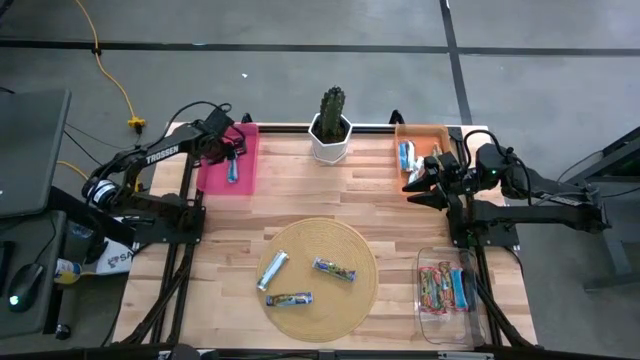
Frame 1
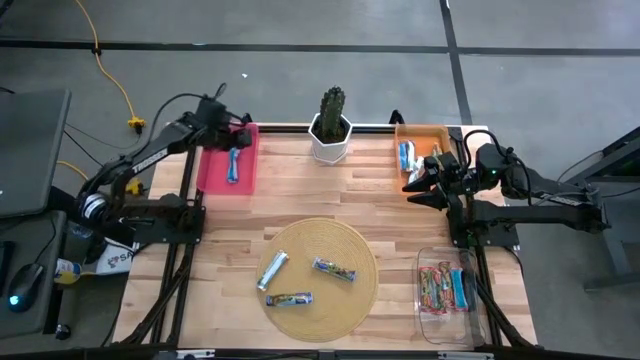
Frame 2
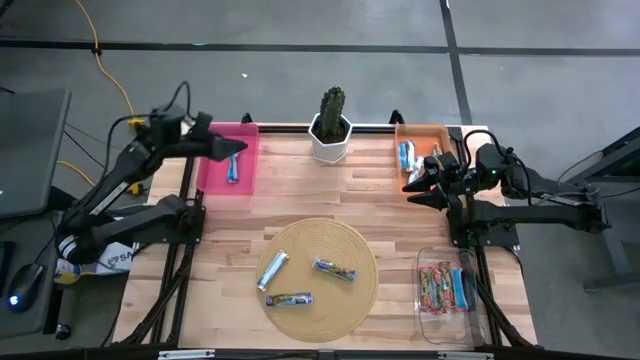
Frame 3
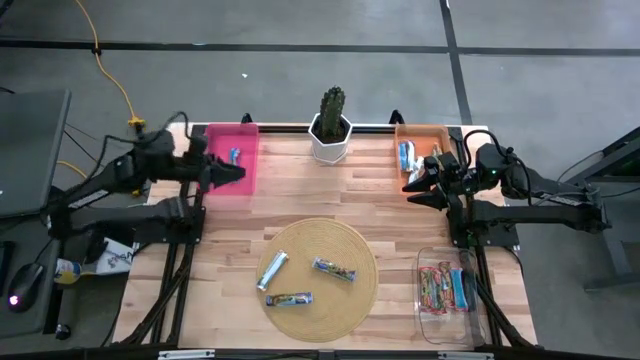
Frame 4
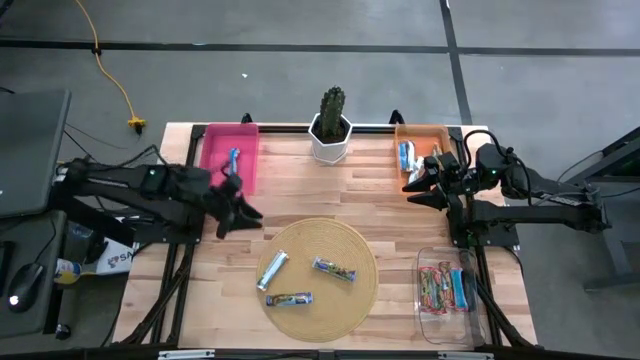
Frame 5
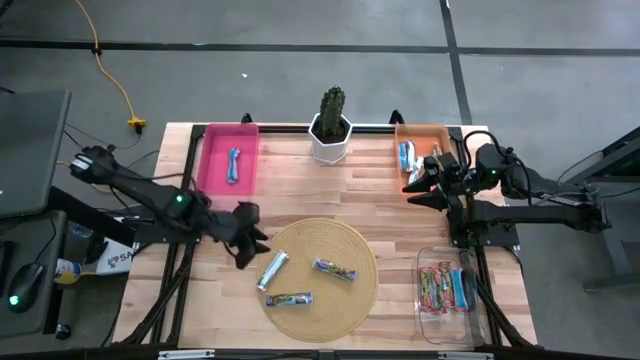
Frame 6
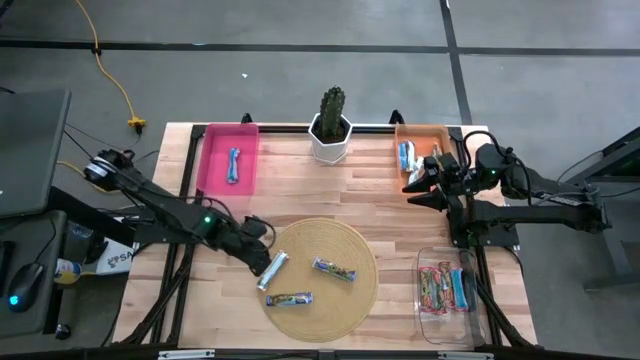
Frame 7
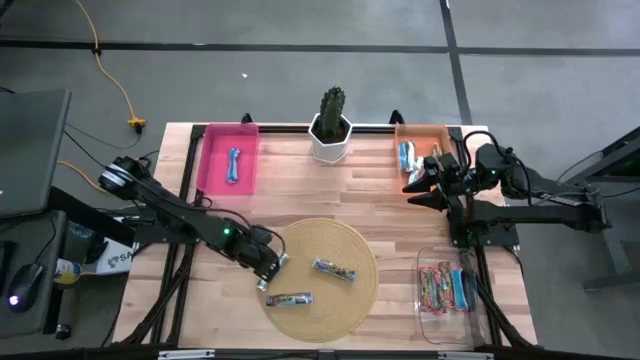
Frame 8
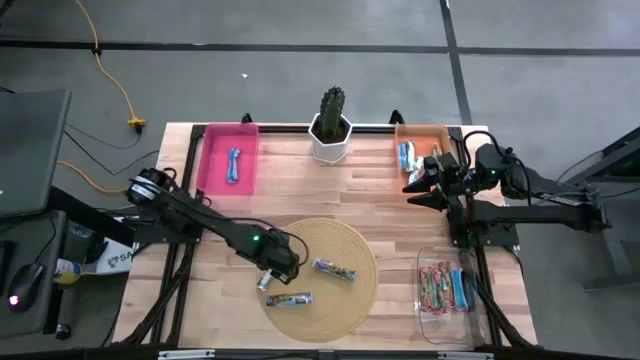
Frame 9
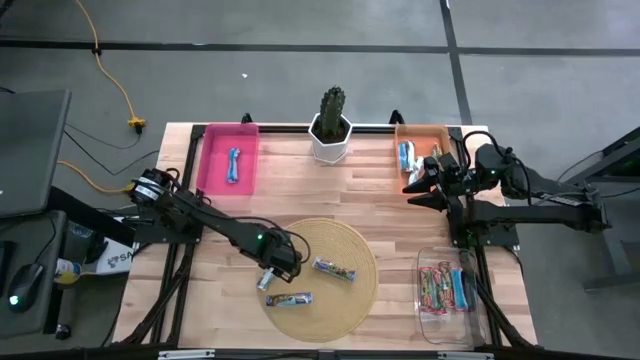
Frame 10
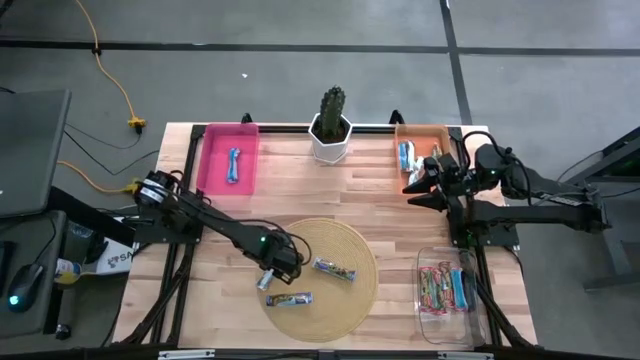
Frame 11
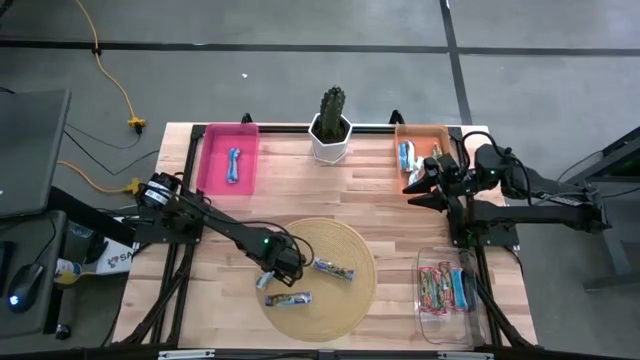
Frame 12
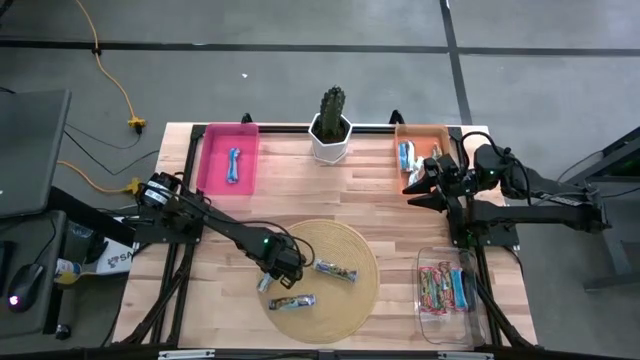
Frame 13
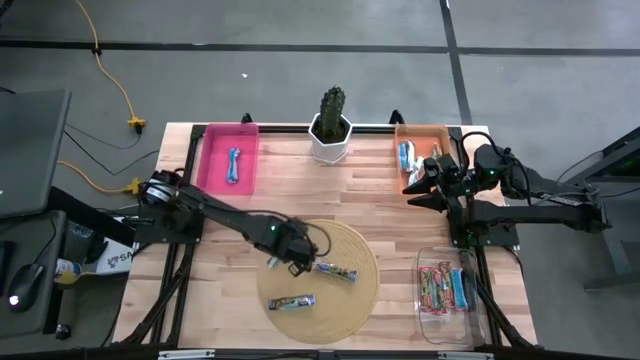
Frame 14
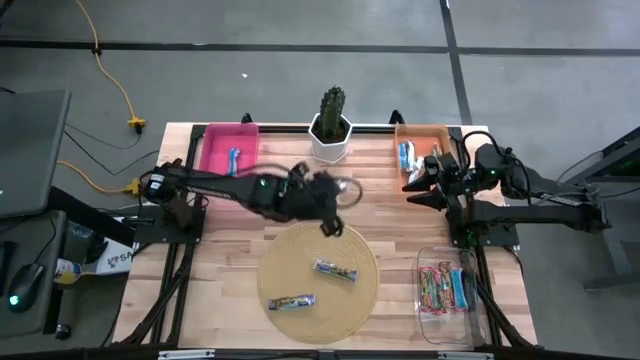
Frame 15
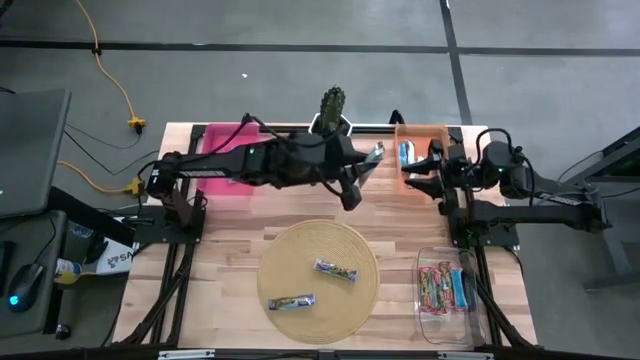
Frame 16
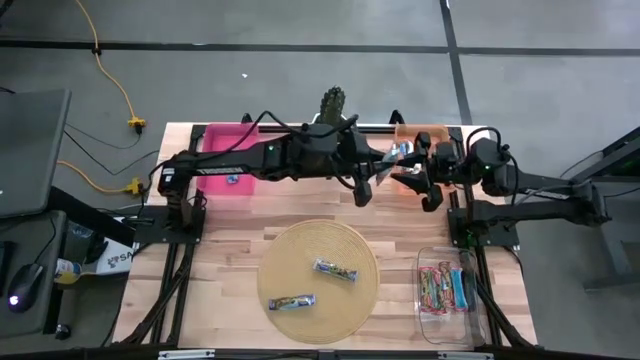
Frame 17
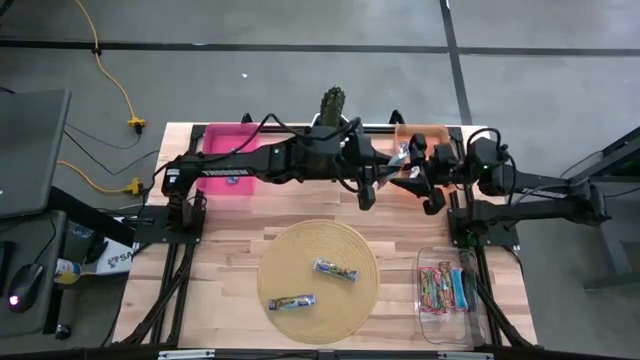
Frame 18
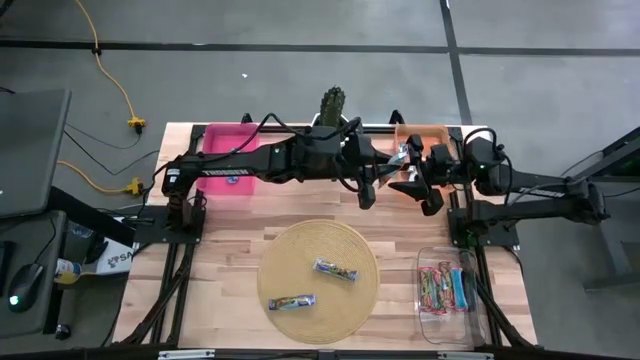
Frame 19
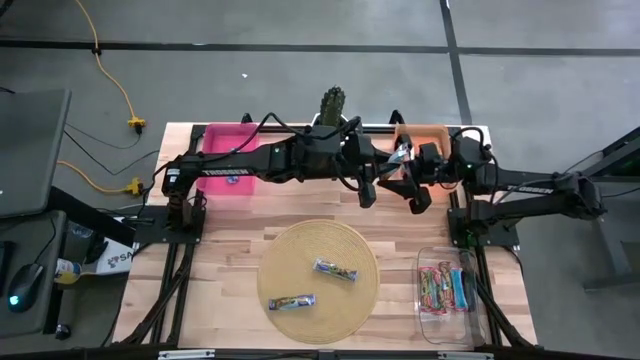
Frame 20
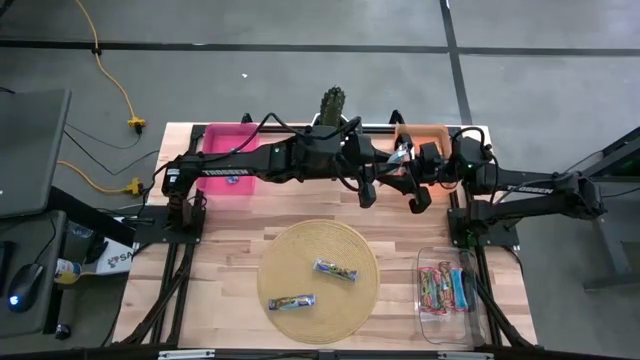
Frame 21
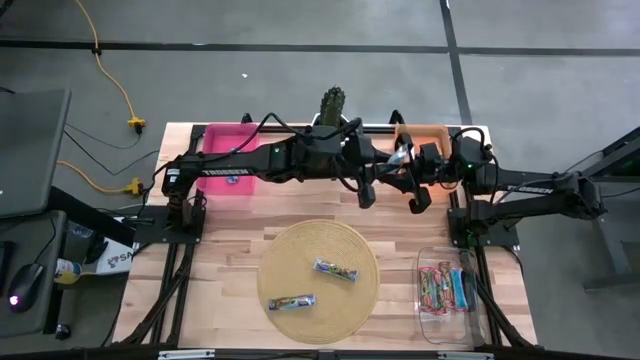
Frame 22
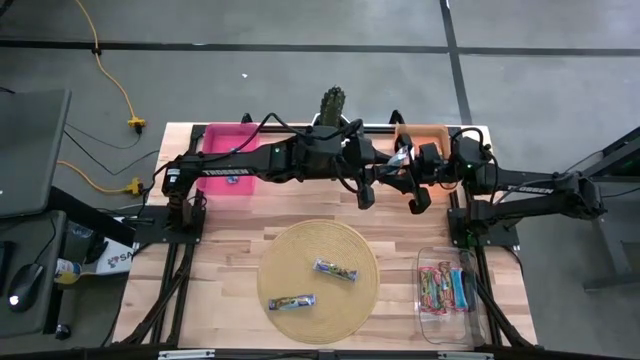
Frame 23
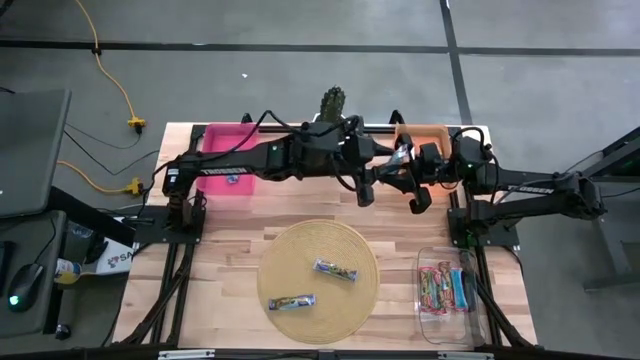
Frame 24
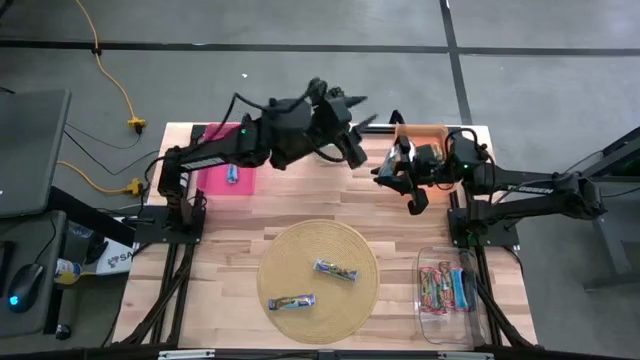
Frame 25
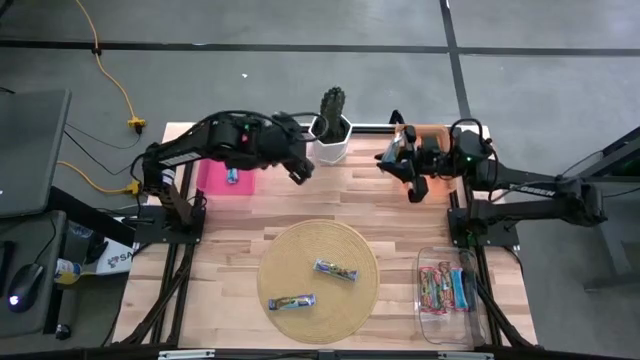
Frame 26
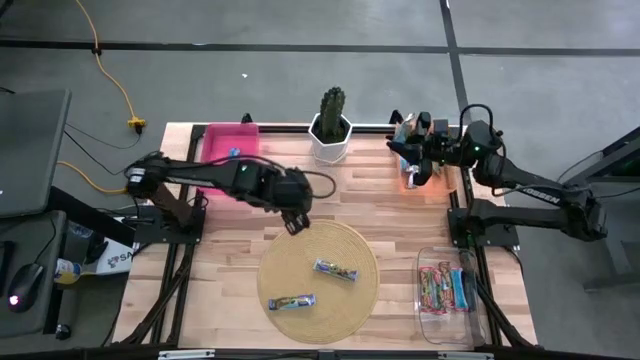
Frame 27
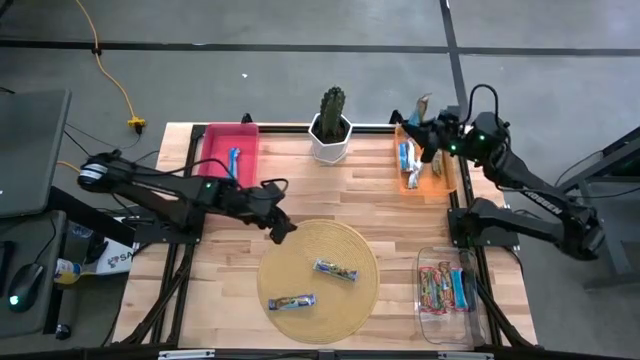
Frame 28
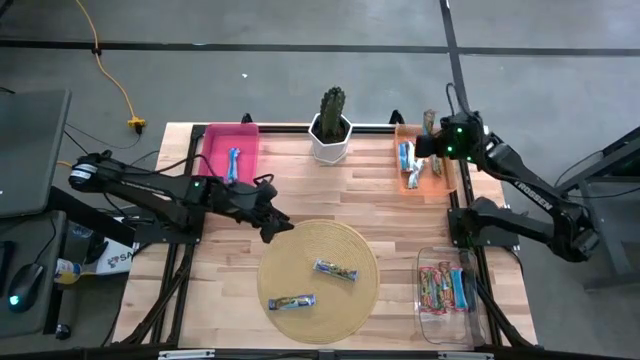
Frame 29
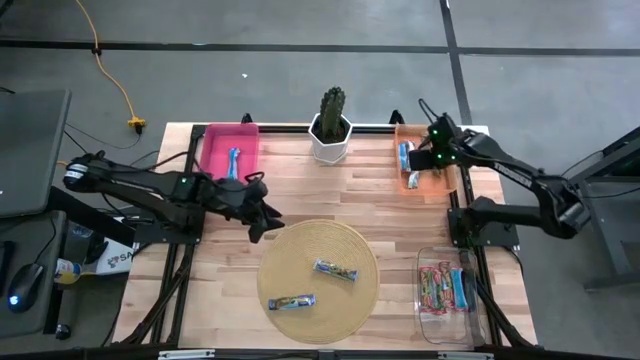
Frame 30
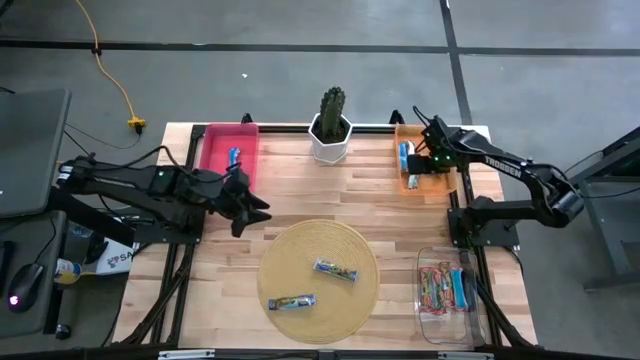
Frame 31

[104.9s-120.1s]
Task: Pick and place Granola Bars by type
Put the yellow granola bar into the orange bin

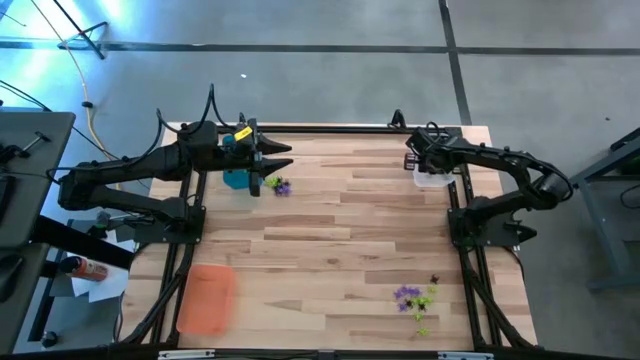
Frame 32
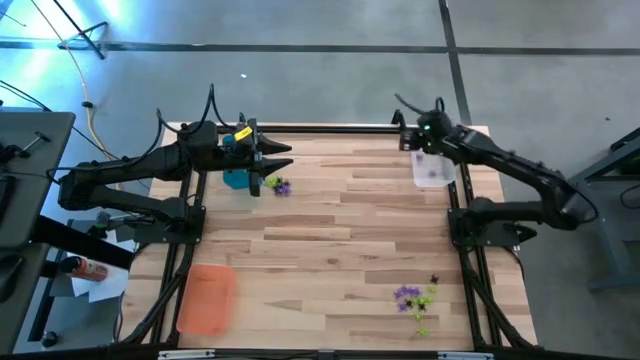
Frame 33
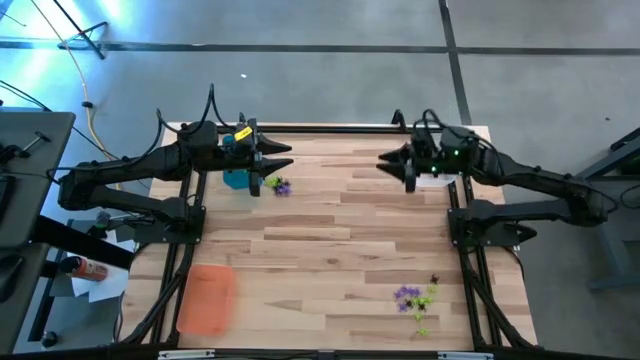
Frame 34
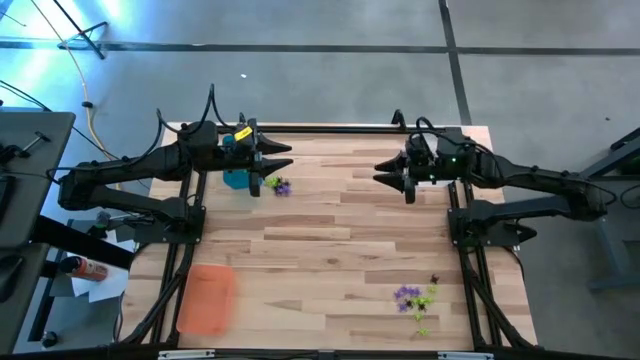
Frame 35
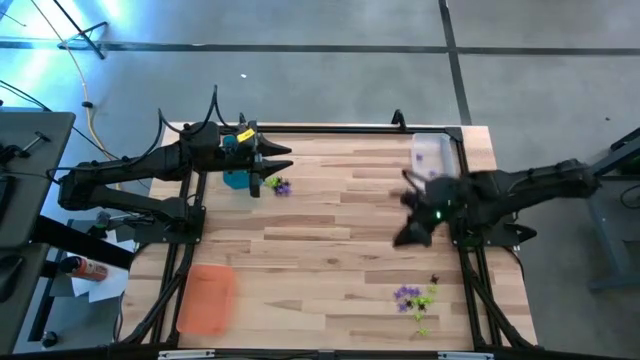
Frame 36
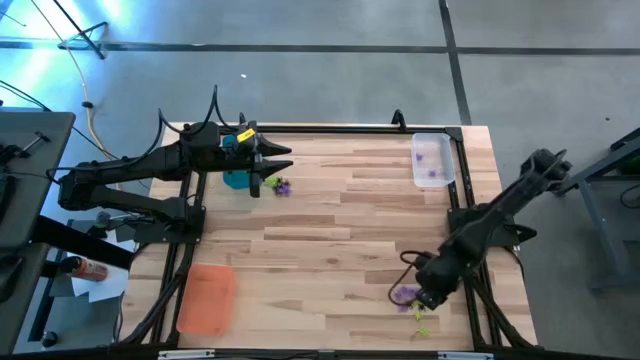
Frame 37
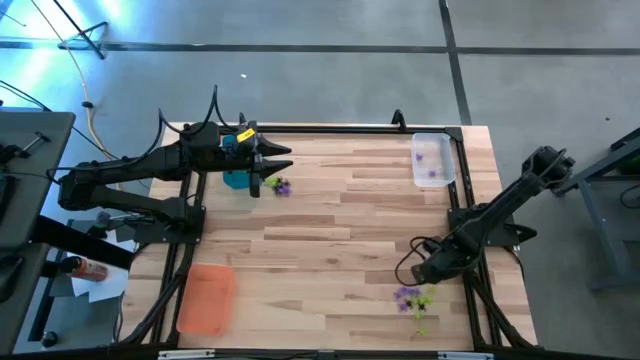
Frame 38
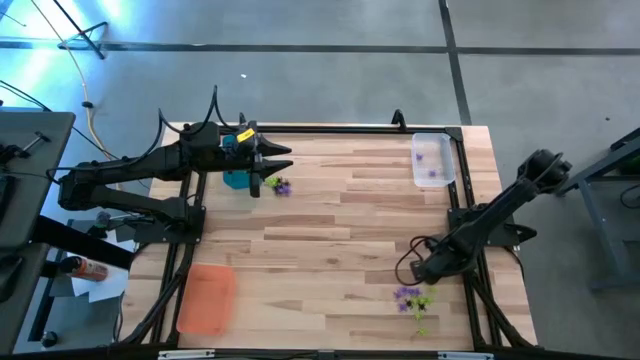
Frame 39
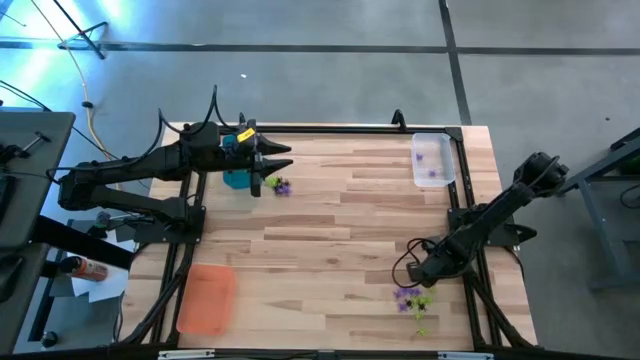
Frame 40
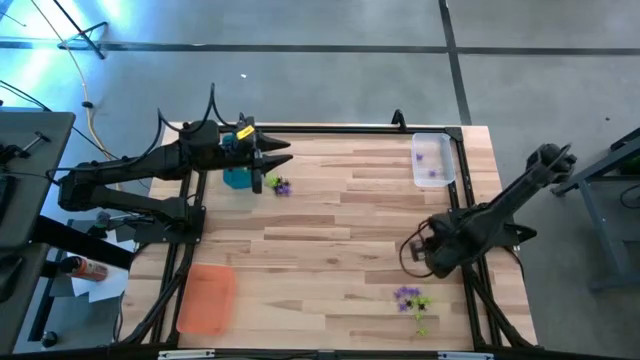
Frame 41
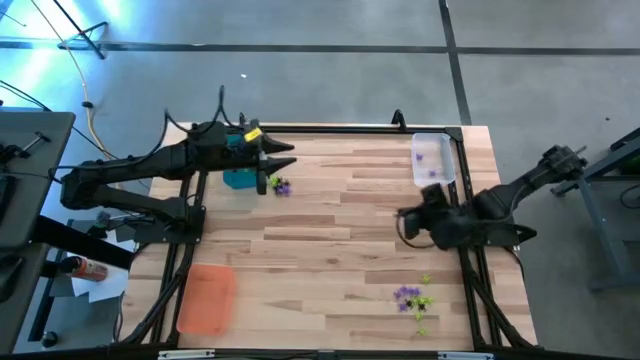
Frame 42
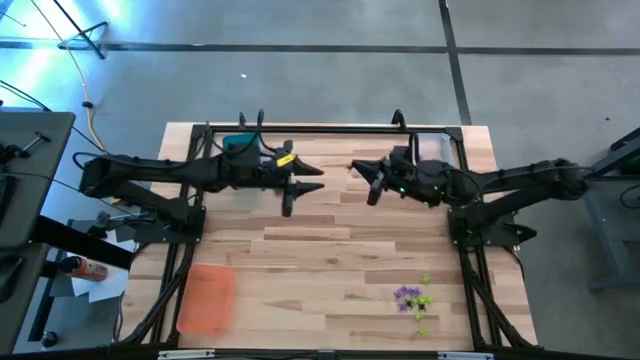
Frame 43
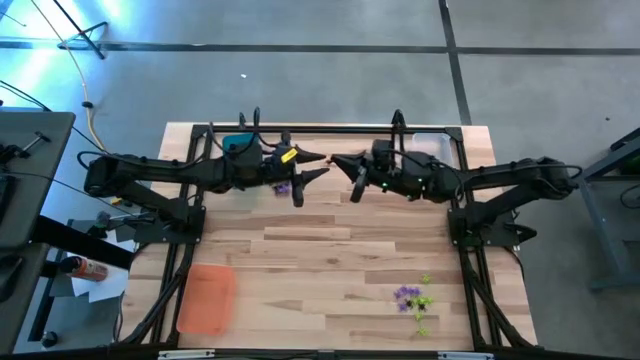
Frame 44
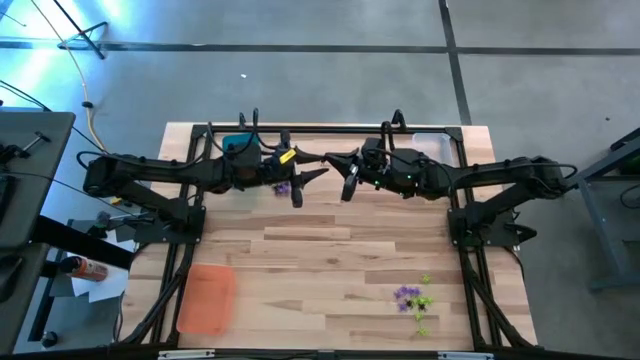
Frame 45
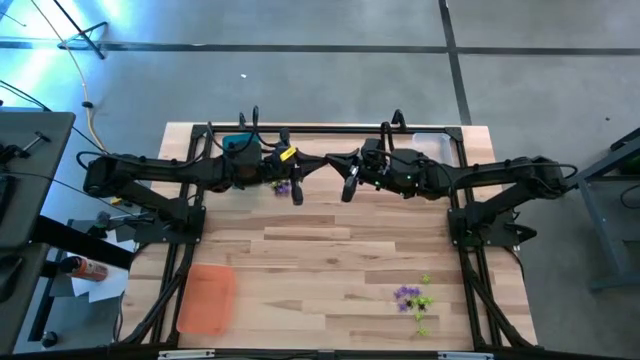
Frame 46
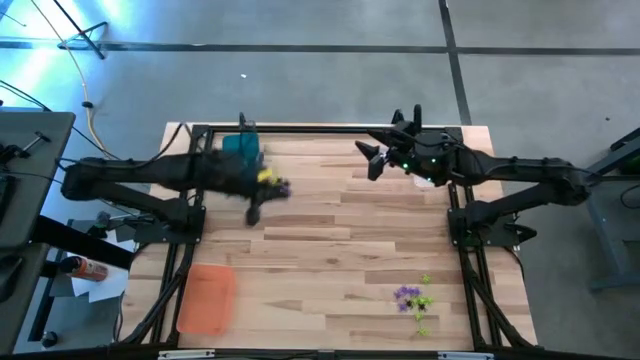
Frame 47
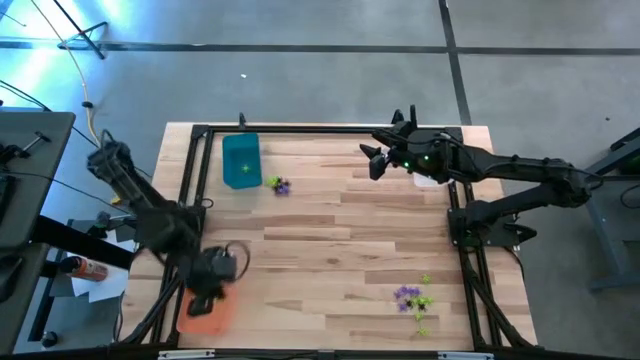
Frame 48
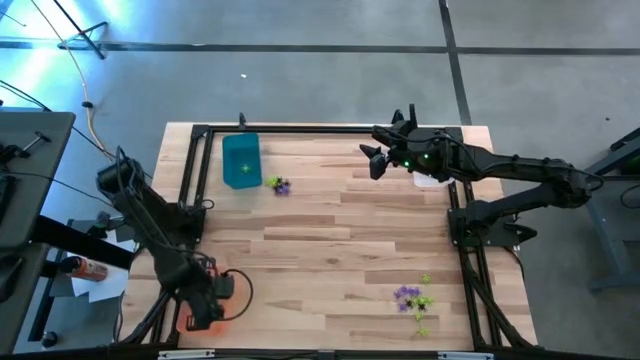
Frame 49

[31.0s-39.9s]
Task: Sort Halloween decoration
Put the black spider toy into the orange bin
